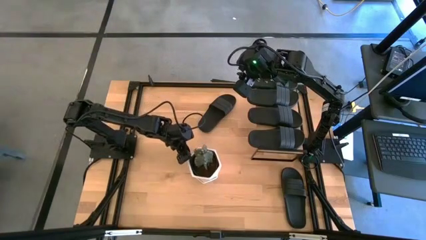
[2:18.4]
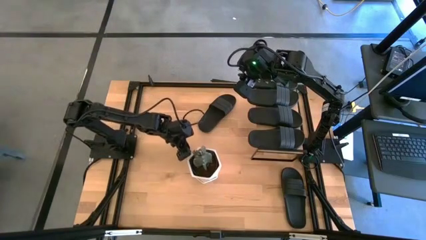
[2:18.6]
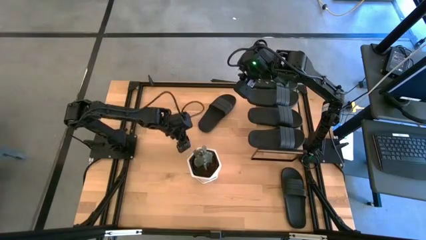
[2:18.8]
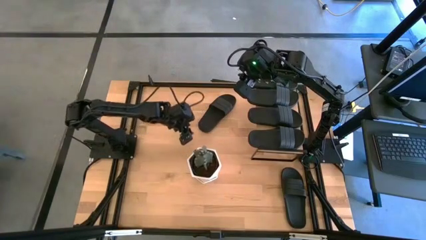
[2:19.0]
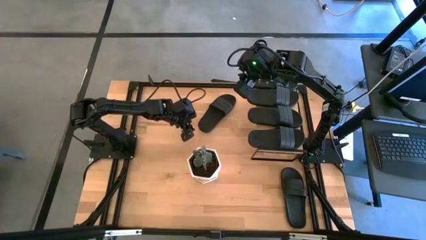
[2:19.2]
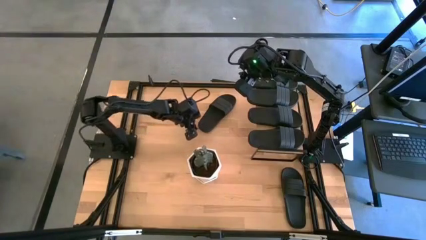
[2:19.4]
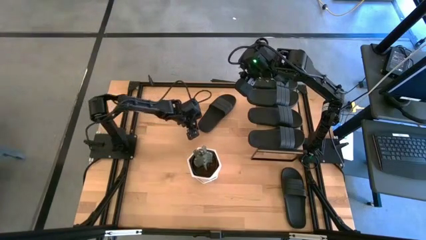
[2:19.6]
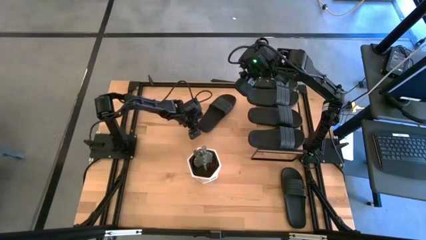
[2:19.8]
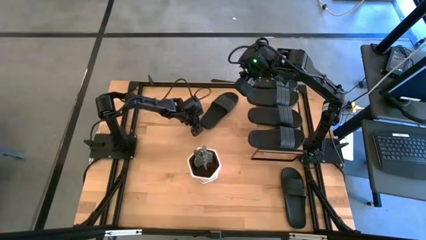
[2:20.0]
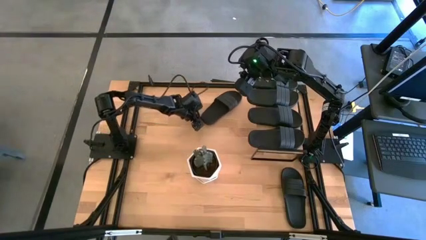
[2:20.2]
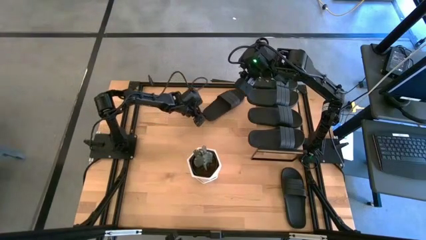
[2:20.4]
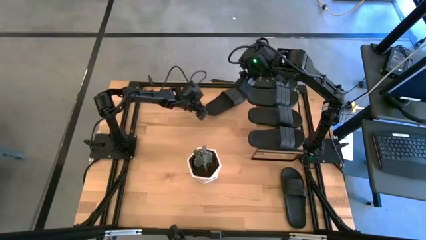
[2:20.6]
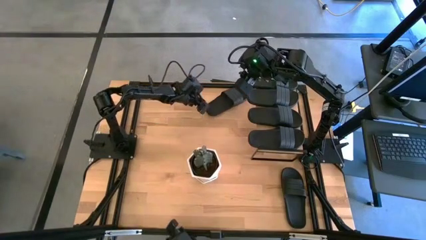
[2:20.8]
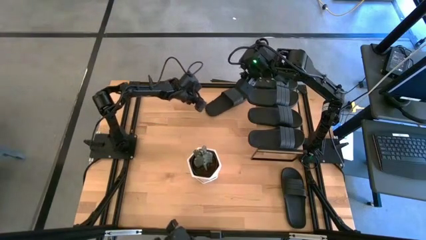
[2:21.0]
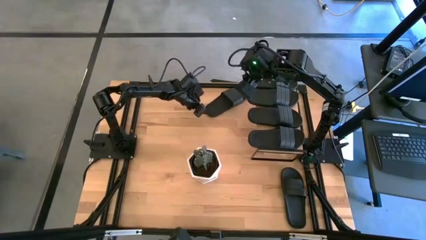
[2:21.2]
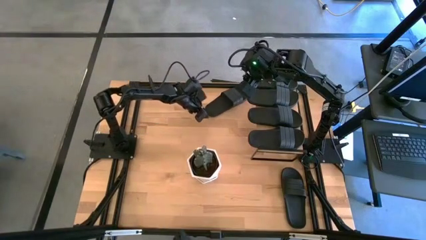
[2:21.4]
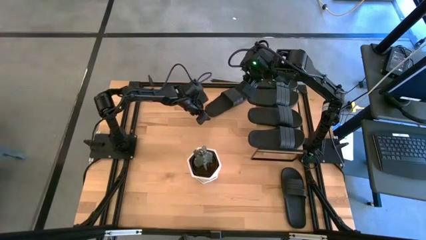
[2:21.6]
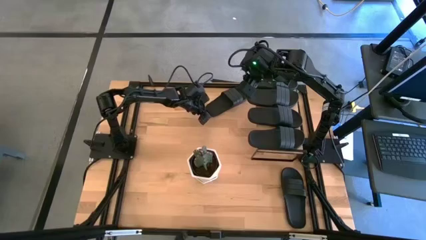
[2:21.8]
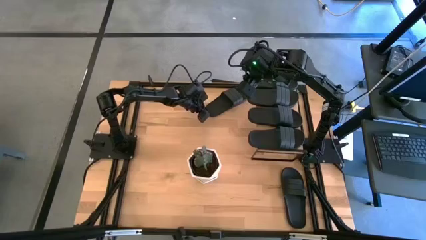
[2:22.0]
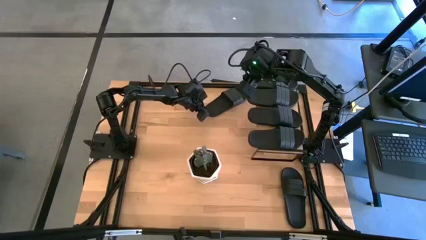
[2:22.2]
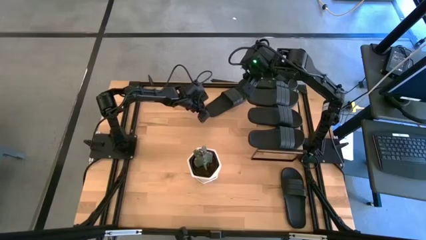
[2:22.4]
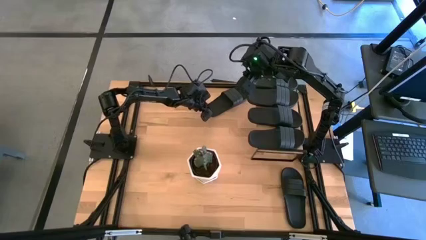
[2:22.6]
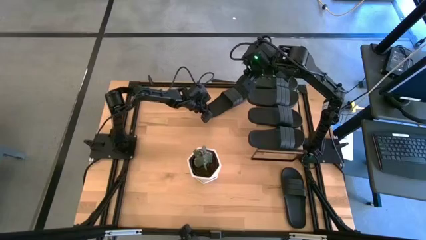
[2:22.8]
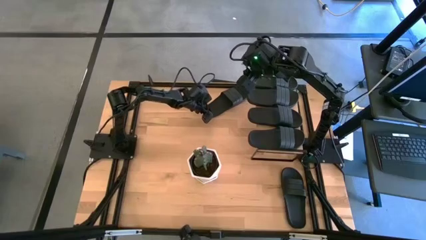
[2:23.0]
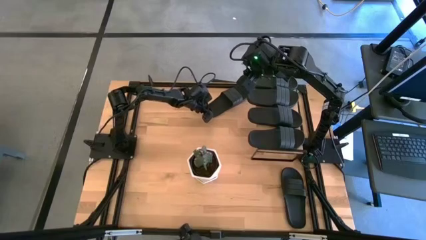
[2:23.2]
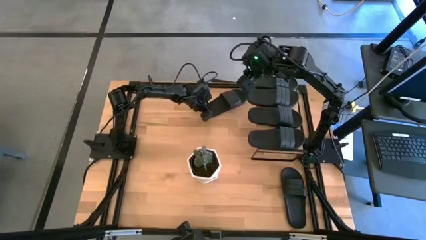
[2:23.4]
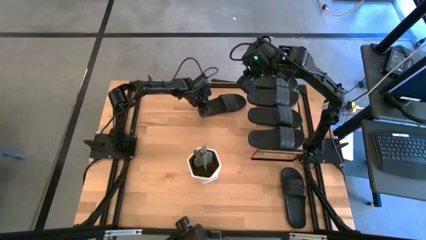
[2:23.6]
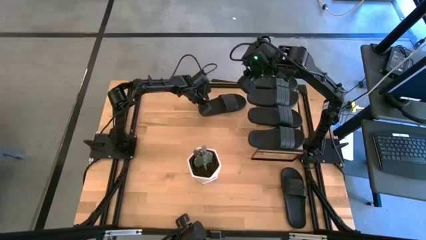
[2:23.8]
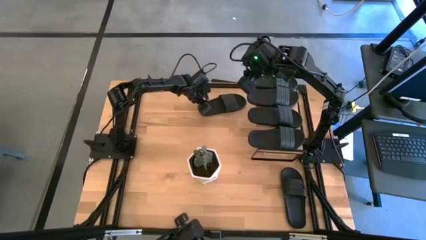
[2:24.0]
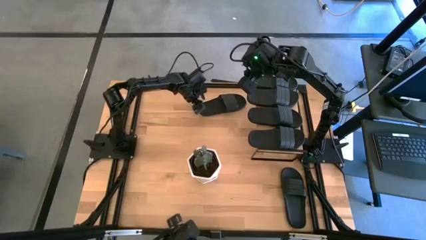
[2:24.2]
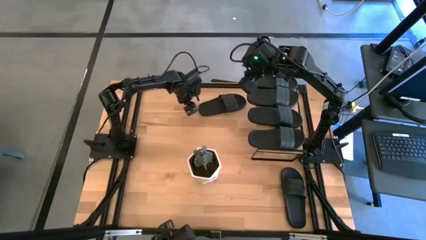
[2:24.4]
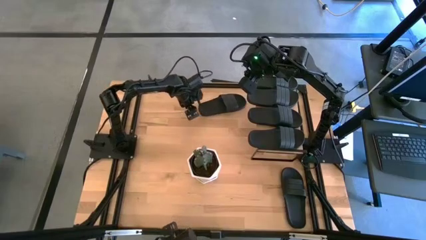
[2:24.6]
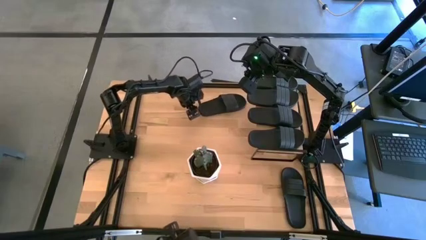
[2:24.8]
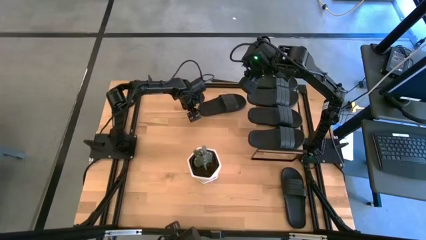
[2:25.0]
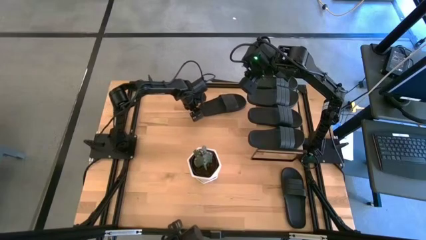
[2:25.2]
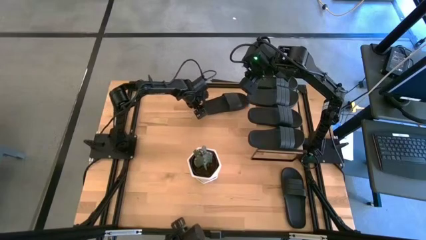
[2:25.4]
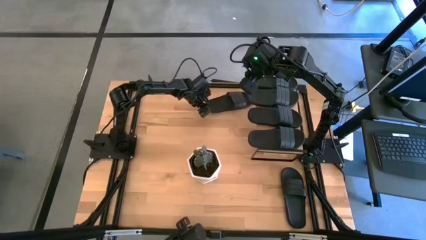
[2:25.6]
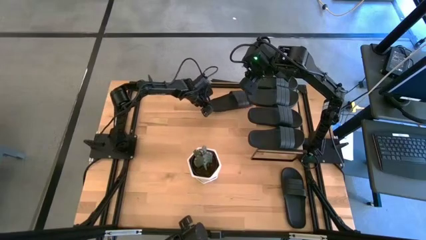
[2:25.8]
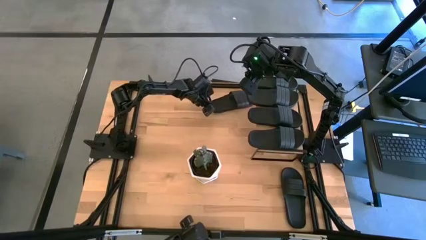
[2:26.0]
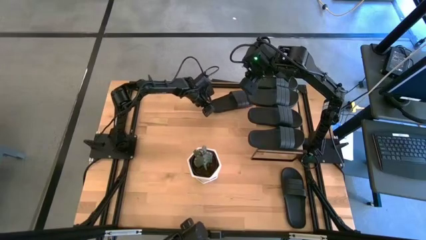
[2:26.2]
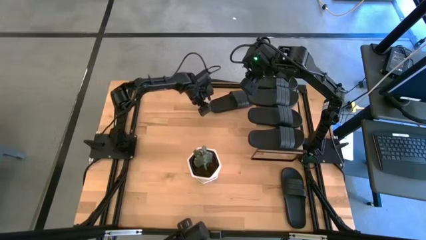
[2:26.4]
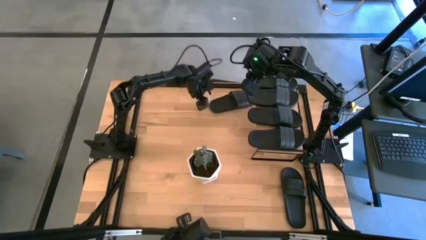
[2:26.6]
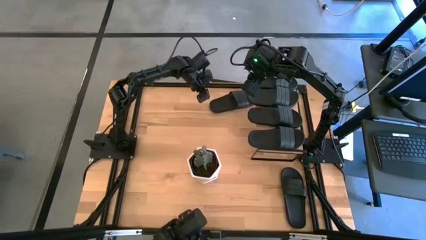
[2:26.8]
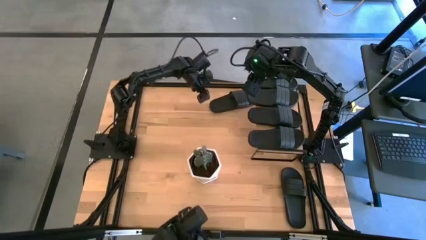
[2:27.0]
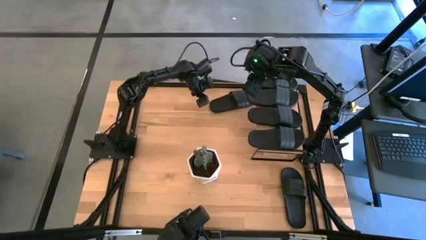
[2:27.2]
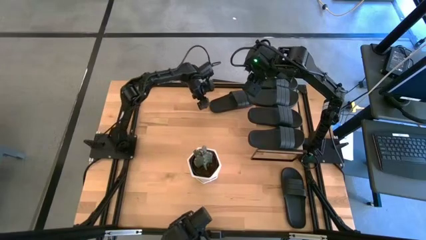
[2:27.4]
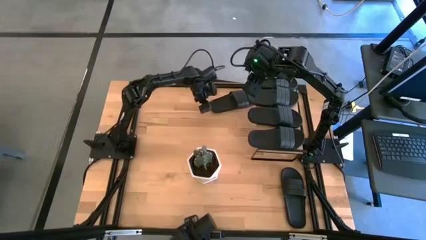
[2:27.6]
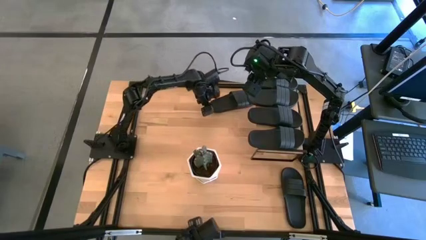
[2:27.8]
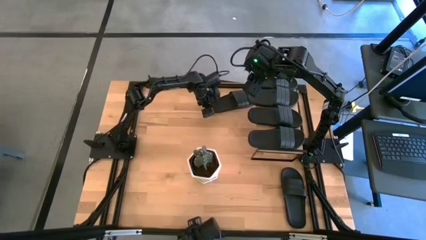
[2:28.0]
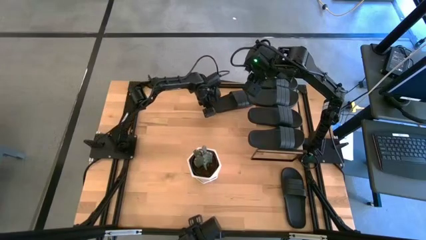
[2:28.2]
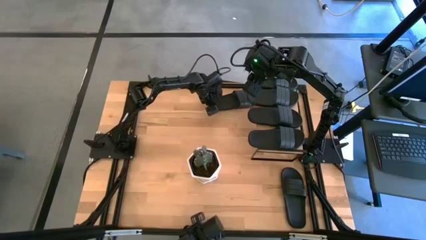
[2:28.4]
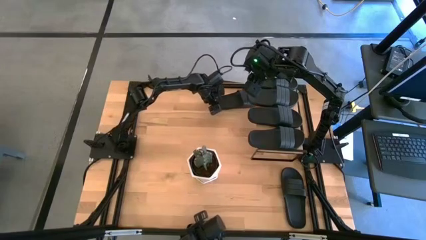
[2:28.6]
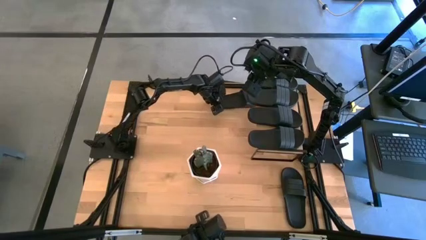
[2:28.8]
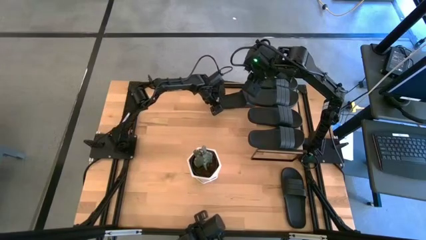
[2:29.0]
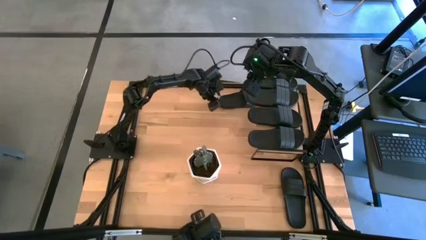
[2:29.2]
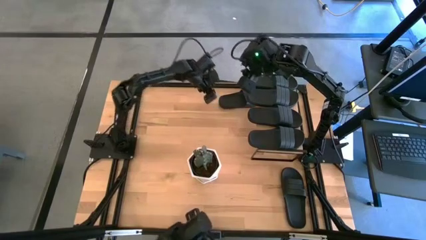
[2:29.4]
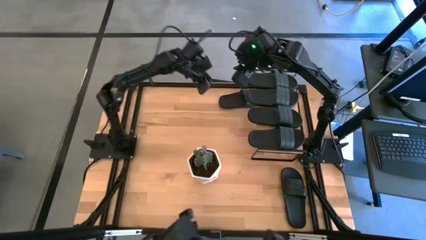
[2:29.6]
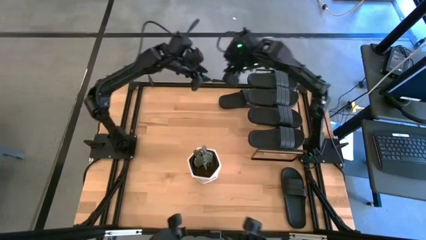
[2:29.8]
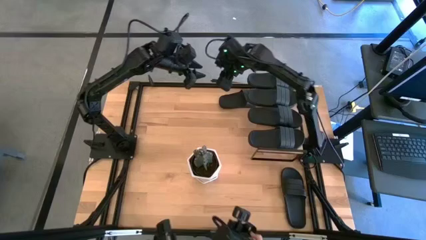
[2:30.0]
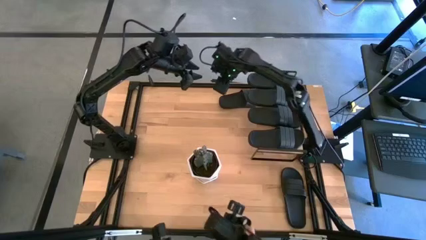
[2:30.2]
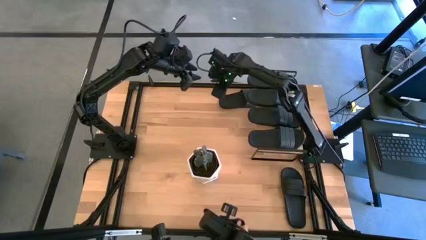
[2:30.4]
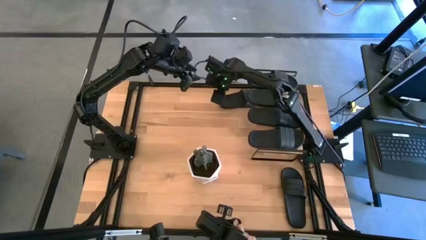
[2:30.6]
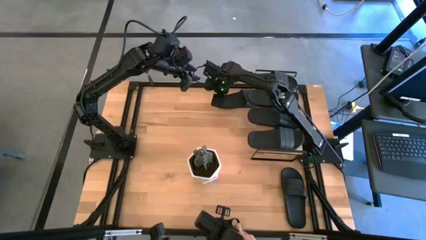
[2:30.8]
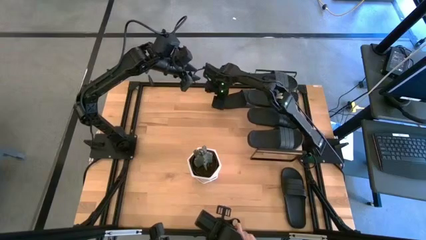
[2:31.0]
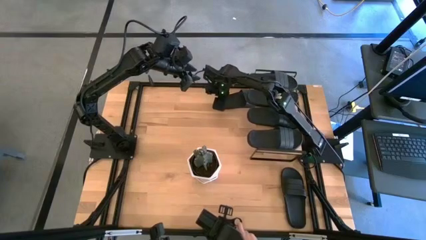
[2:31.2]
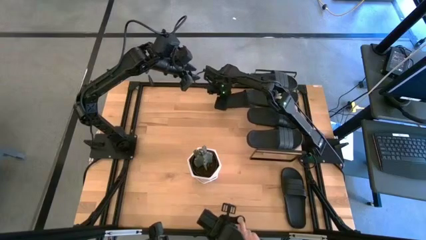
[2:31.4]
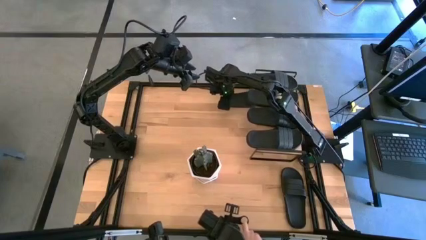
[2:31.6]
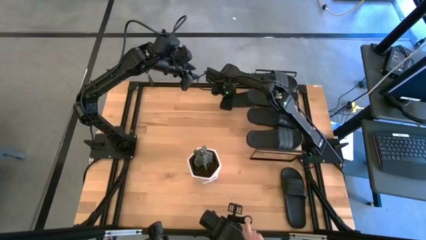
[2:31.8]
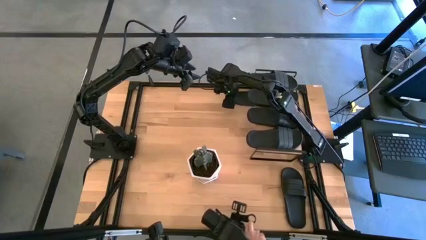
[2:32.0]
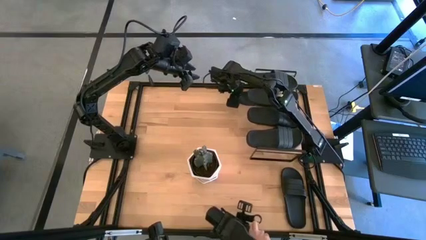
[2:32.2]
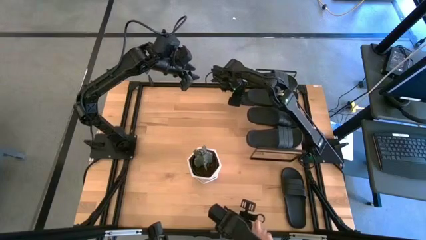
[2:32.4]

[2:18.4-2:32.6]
Task: Pick and place slides into the shelf
Put the black slide under the shelf
